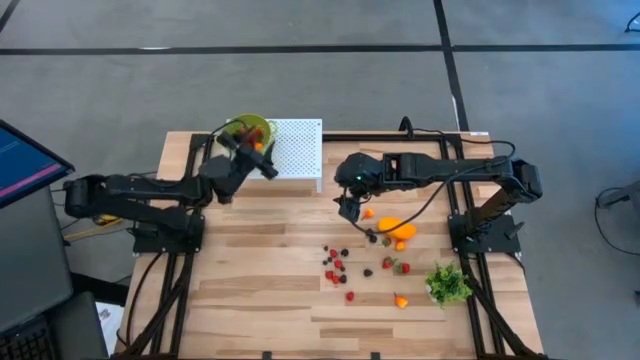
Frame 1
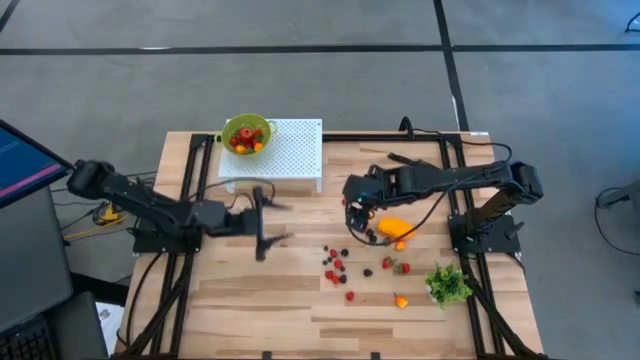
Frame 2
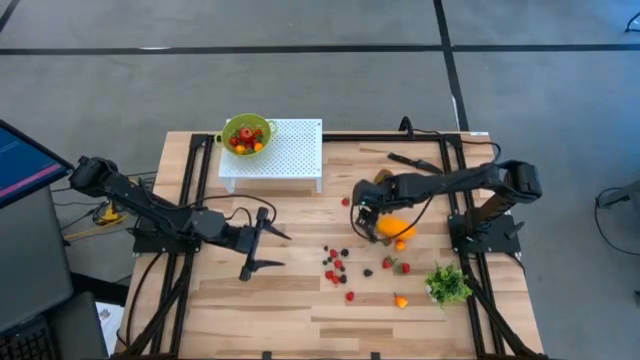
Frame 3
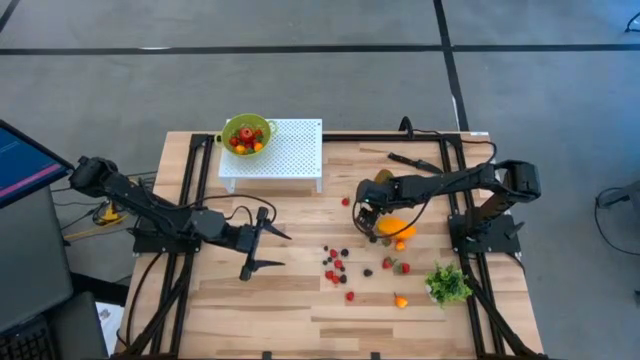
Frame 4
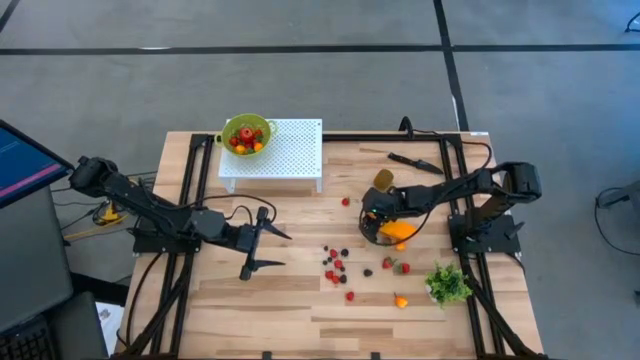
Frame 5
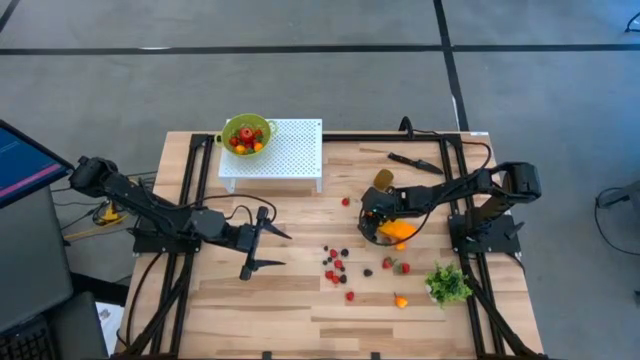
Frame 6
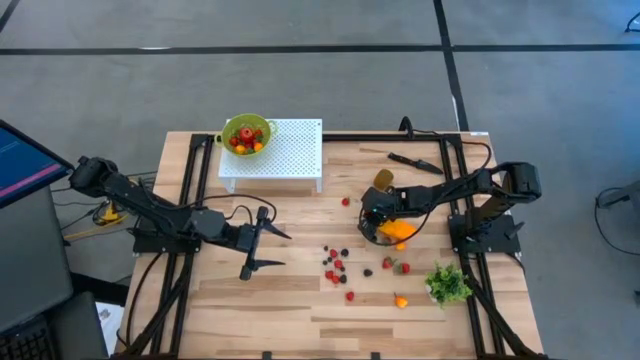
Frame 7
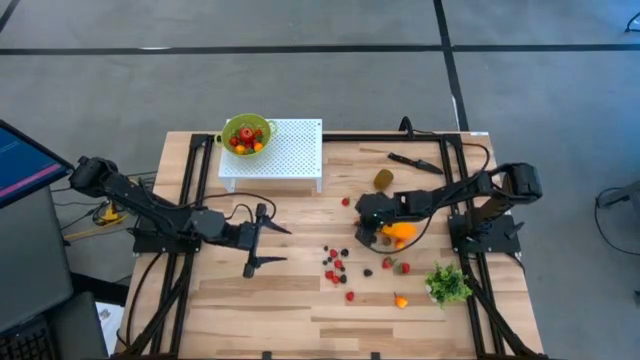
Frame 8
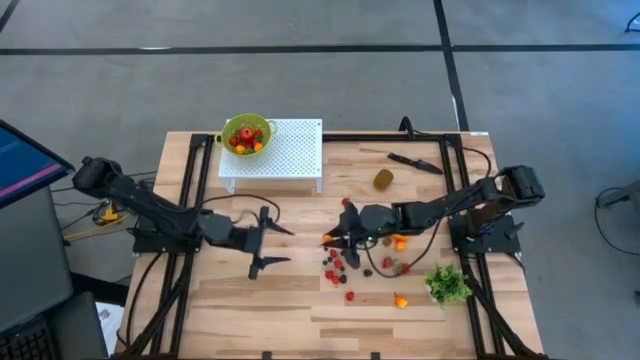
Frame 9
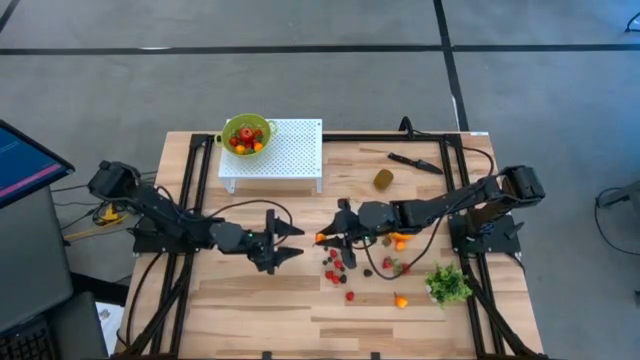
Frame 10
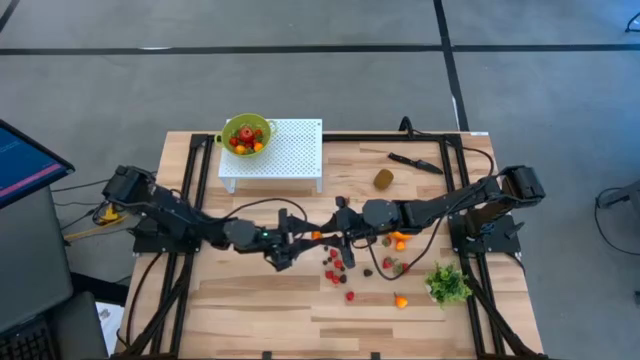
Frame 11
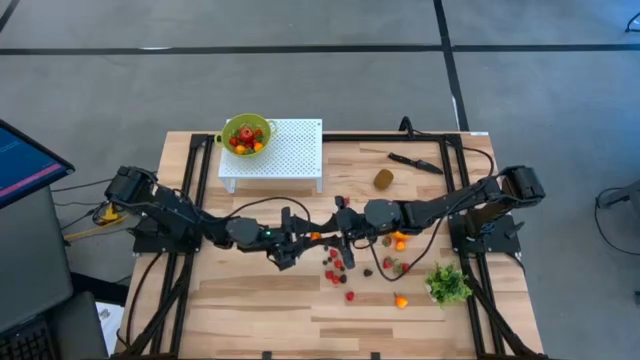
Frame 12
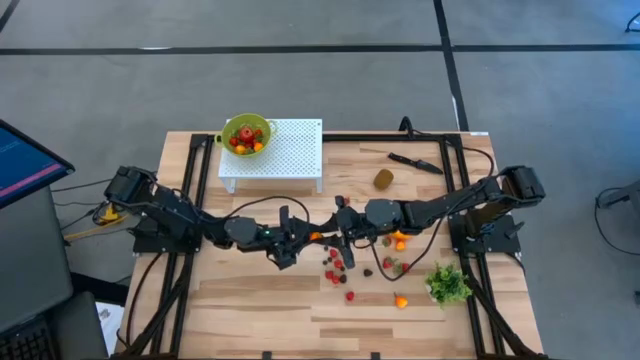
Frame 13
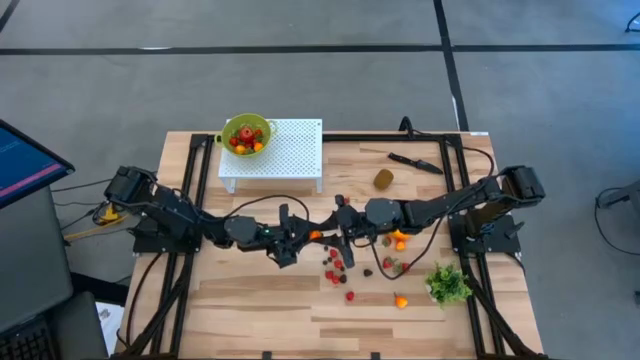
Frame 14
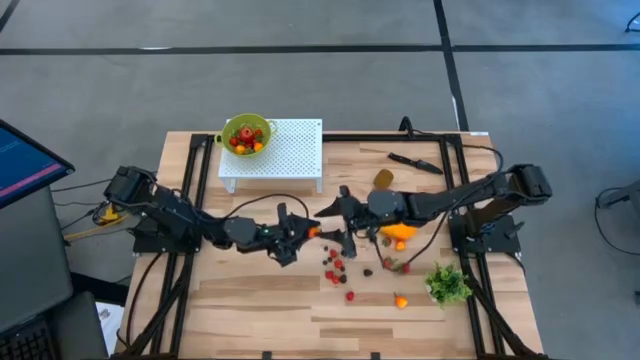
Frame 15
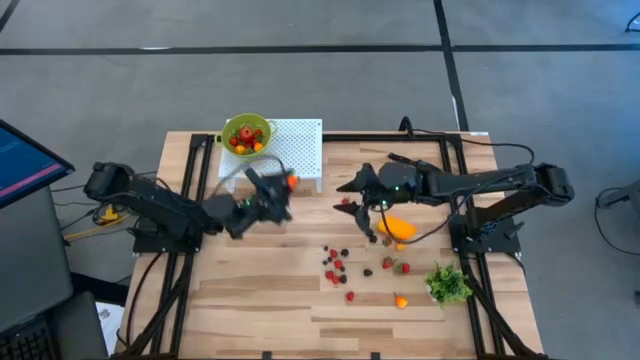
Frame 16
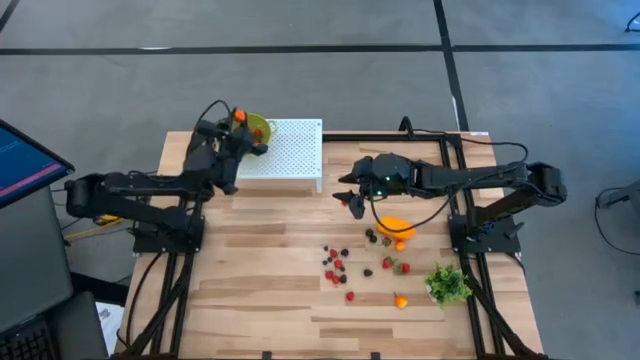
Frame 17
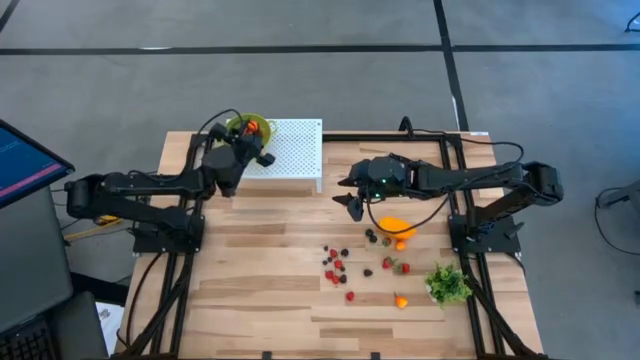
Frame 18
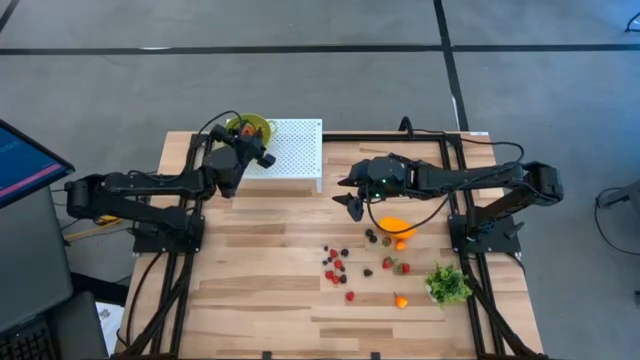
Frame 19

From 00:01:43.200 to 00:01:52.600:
Task: Pick & Place Fruit
Put the peach into the green strainer bowl on the shelf

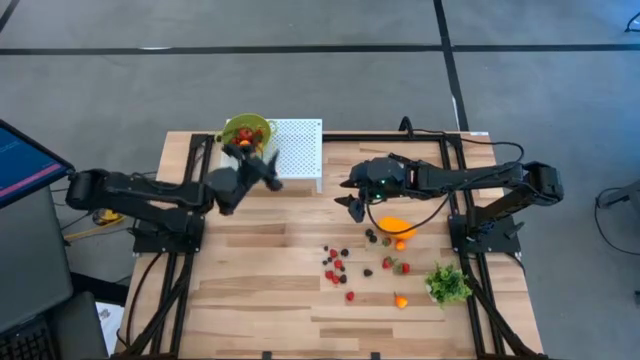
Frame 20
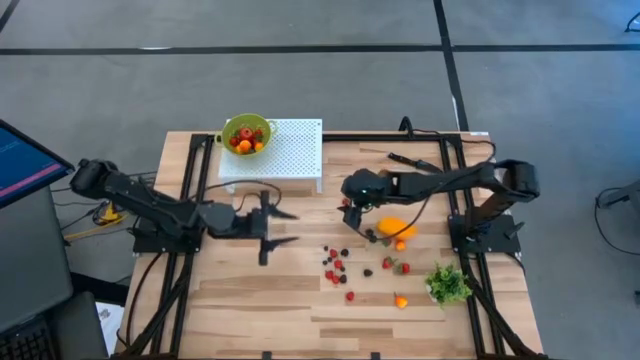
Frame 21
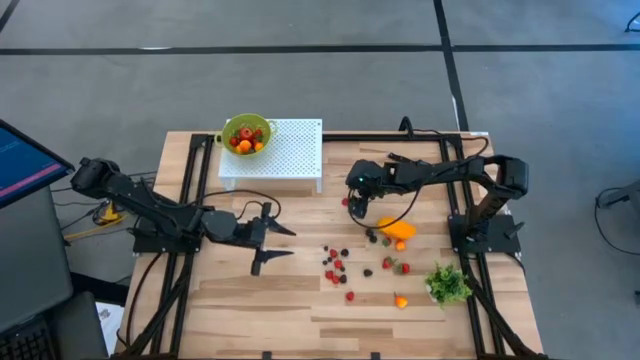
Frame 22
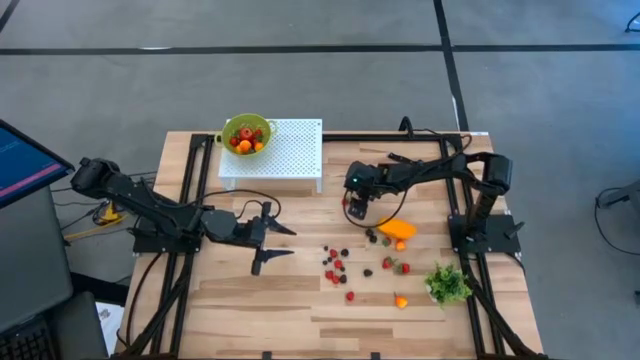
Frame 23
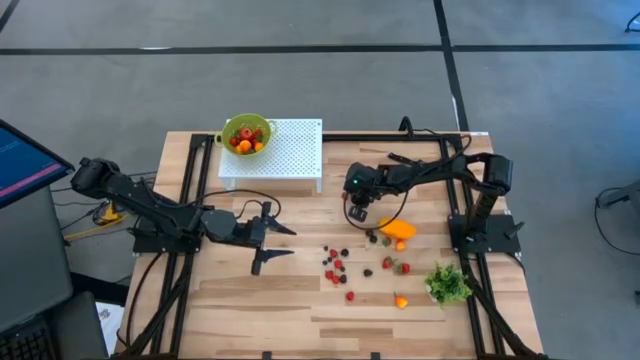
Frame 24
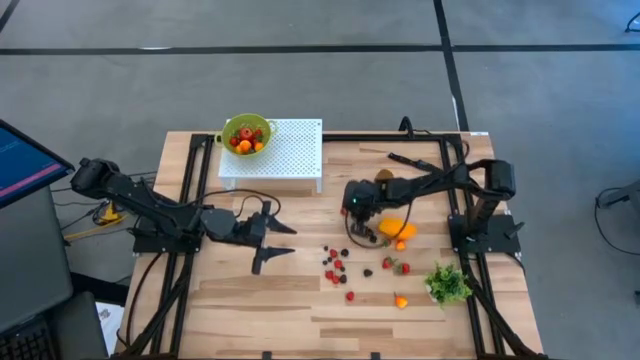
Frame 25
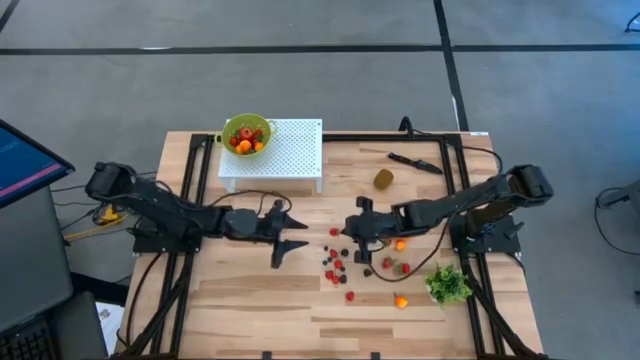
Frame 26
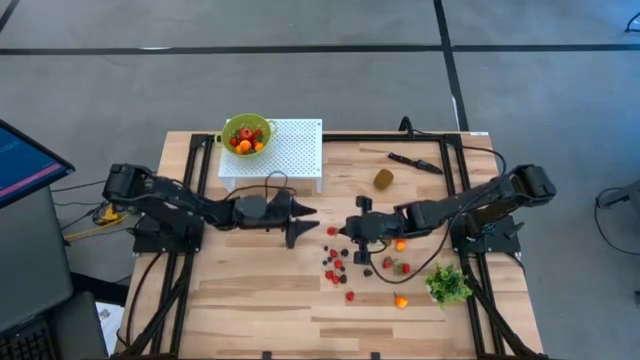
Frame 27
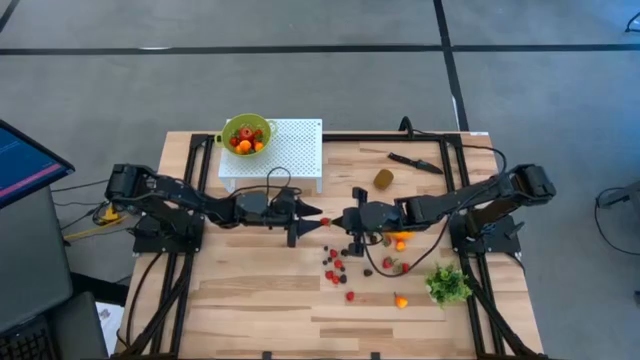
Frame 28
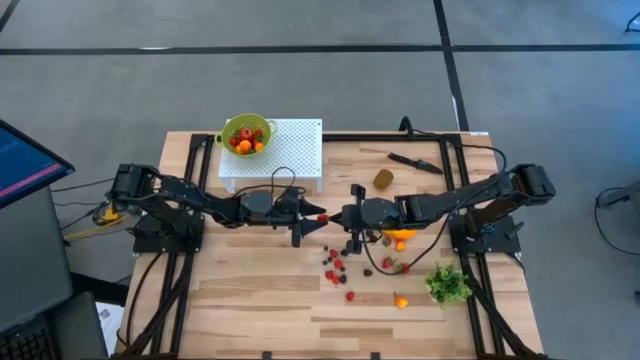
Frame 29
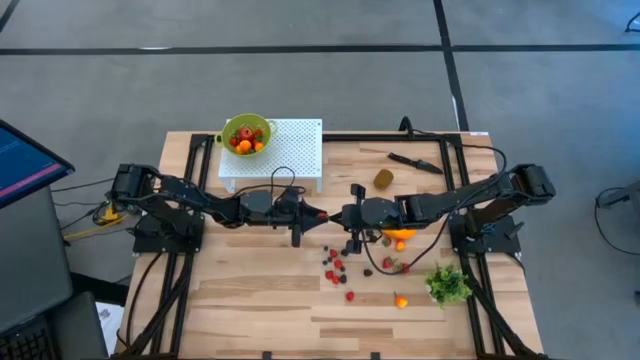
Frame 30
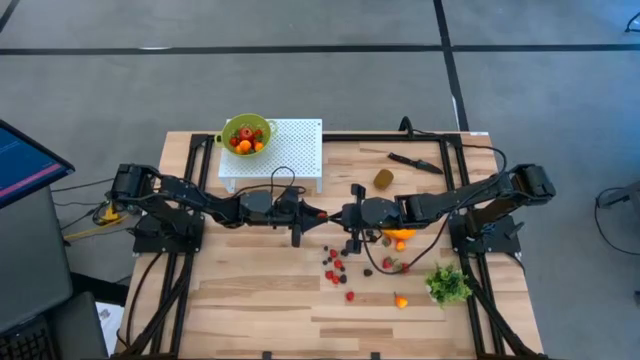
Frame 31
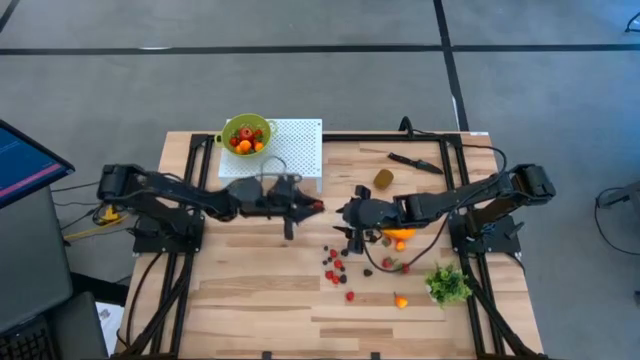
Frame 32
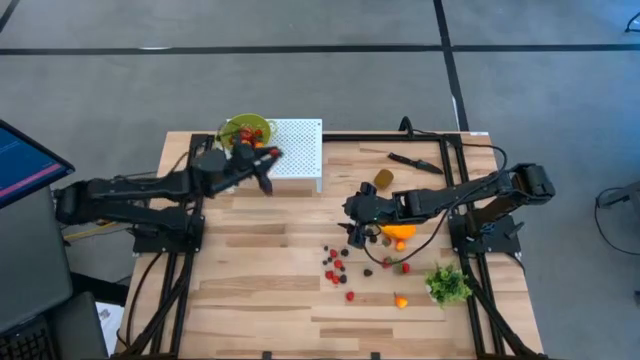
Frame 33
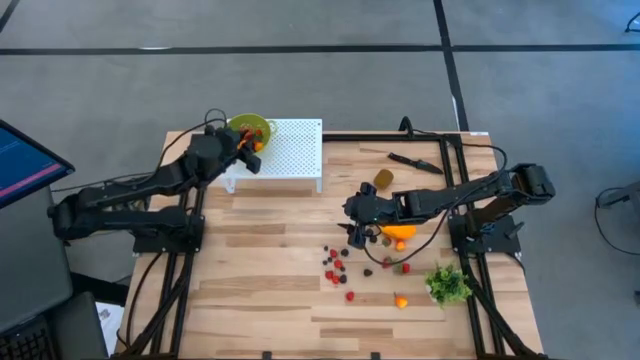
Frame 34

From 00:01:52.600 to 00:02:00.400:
Put the strawberry into the green strainer bowl on the shelf

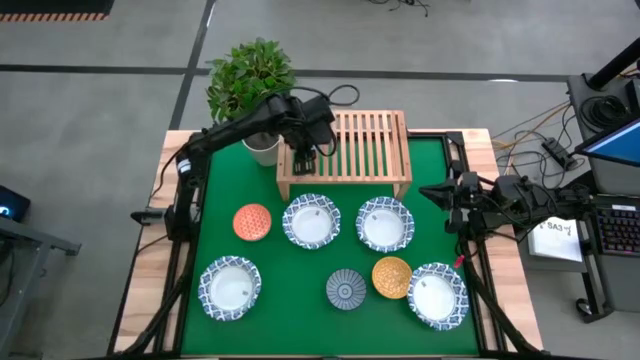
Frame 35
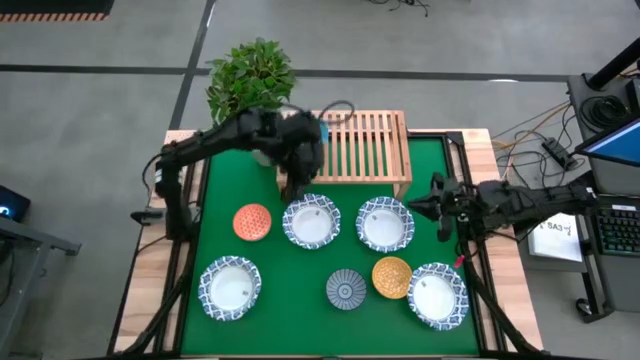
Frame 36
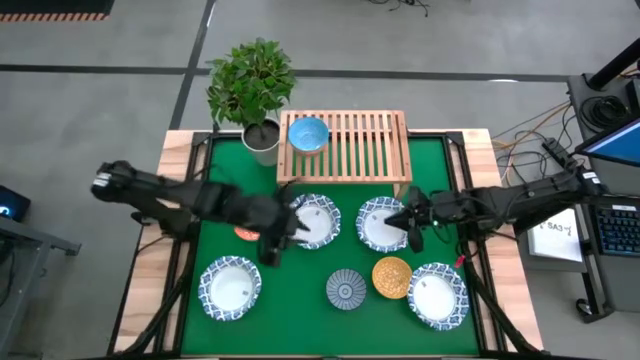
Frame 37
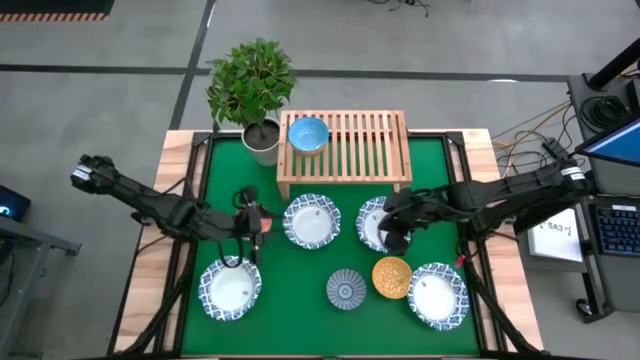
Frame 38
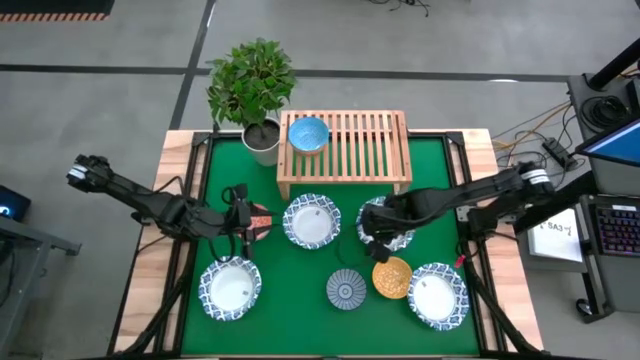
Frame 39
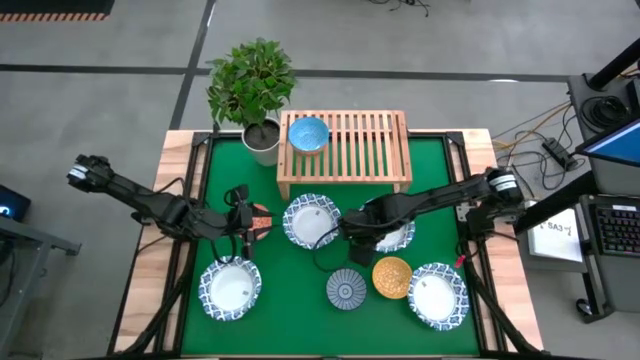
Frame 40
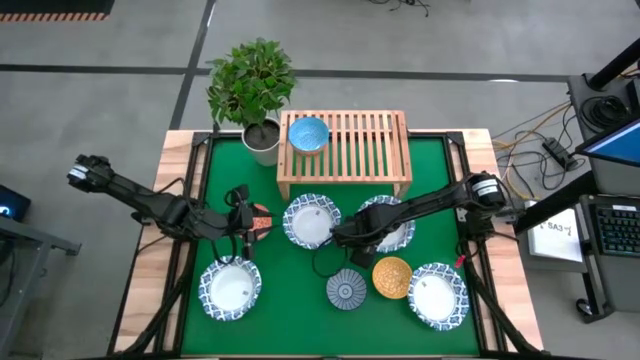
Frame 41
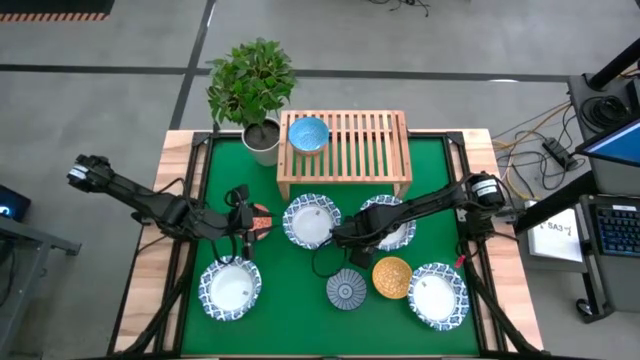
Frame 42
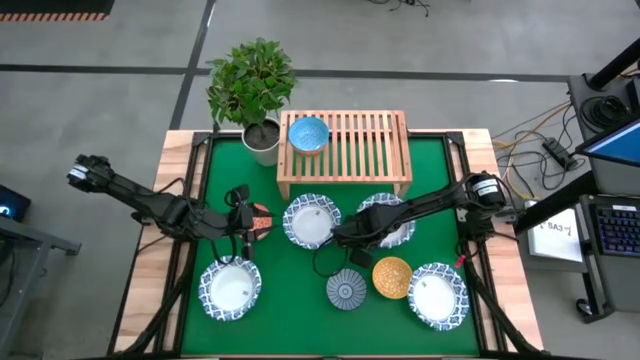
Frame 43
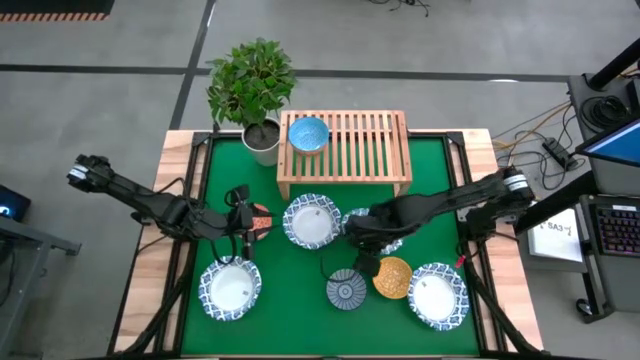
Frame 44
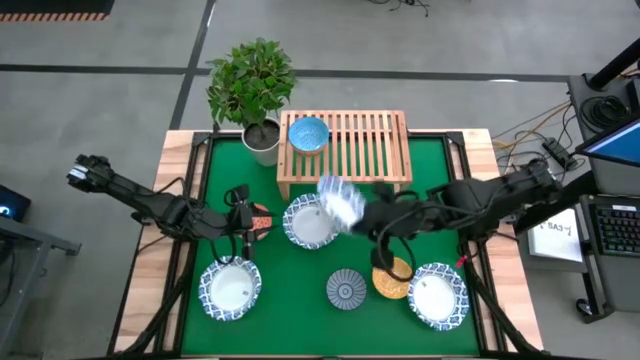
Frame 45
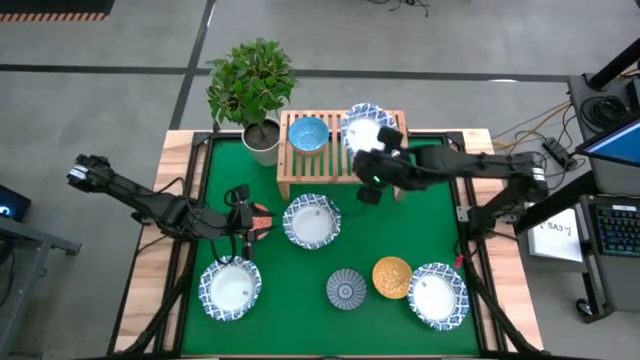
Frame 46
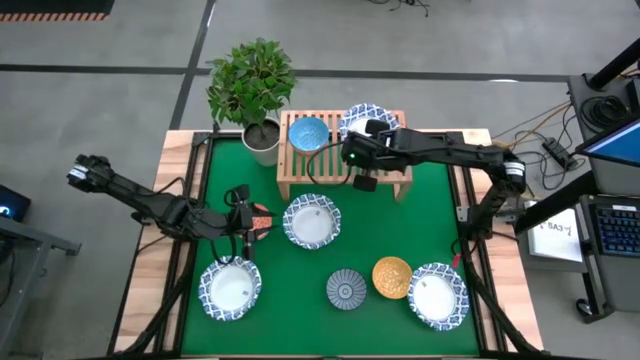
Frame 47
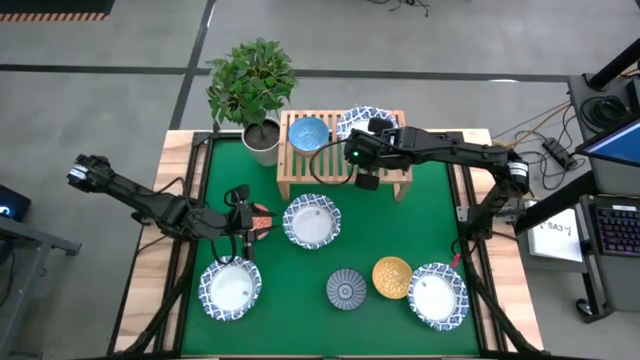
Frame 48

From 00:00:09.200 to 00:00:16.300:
Task: Place and stack bowls onto a shelf
Put the blue patterned bowl on the shelf
